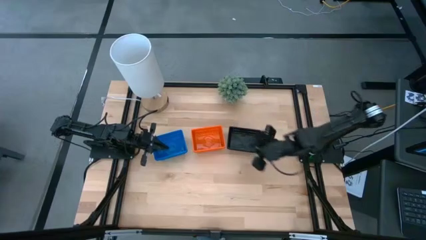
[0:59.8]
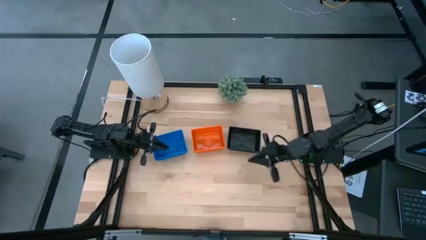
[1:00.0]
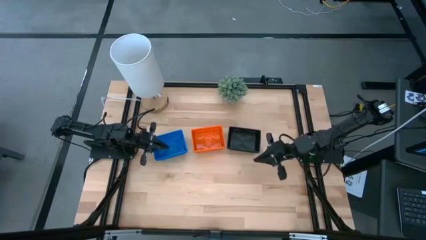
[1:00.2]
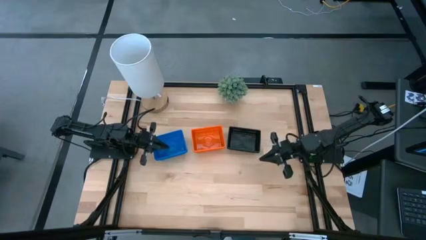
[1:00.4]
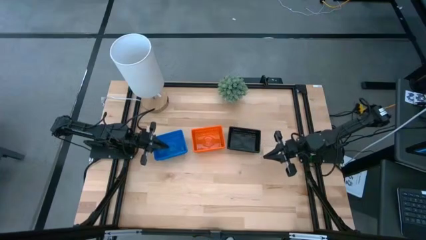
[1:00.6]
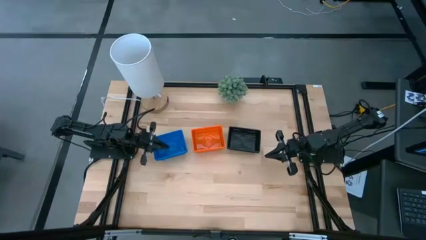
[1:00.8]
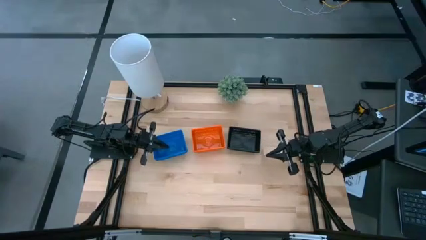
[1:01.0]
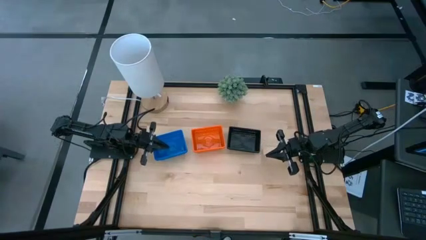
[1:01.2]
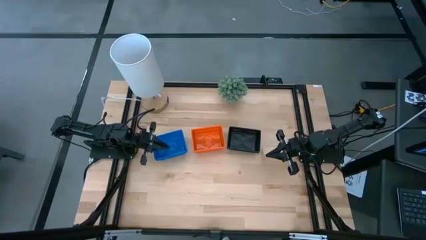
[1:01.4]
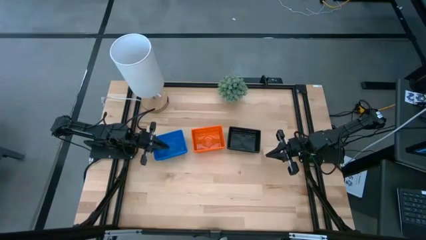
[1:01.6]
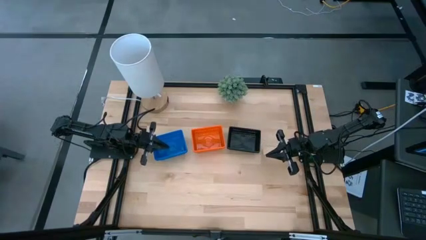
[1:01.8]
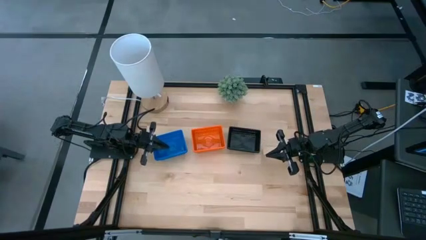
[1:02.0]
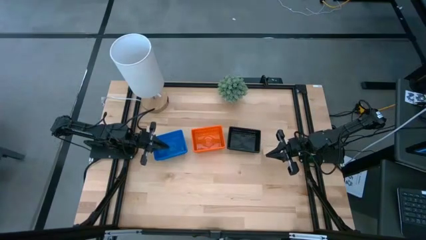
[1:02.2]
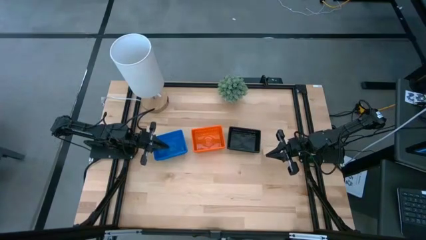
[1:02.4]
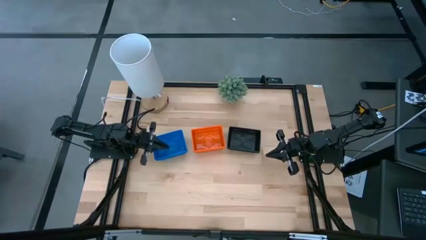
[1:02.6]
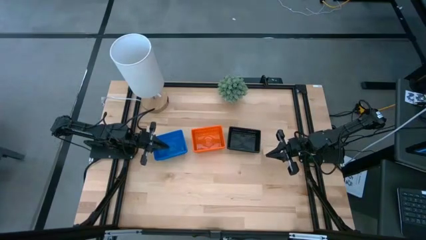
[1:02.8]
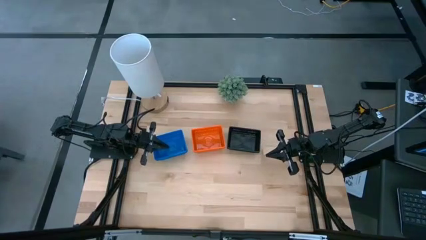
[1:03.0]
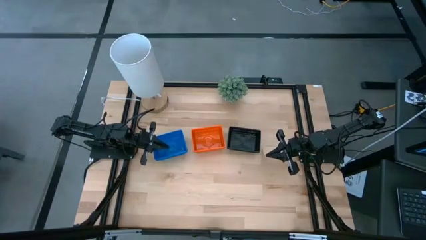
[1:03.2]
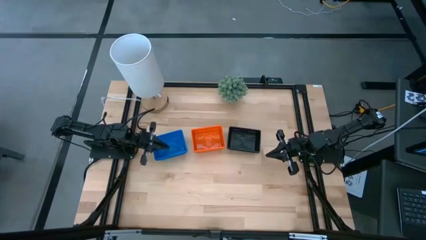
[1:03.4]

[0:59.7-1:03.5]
Return to Home Position

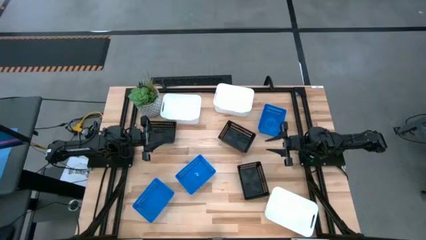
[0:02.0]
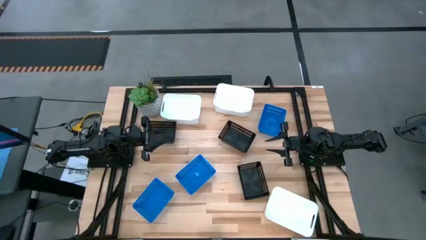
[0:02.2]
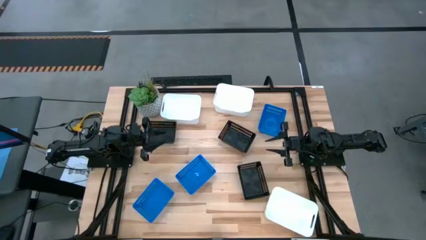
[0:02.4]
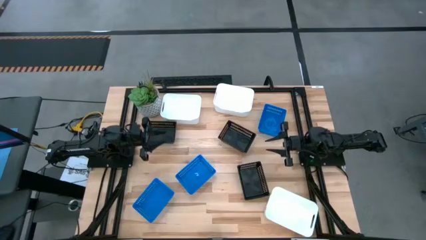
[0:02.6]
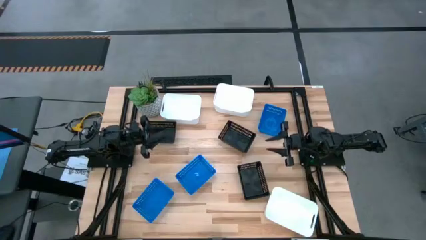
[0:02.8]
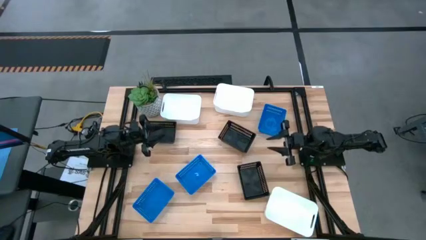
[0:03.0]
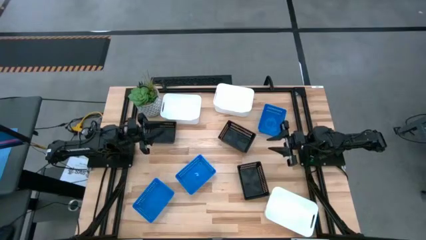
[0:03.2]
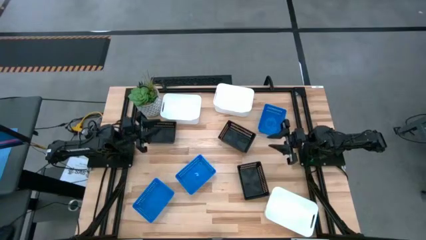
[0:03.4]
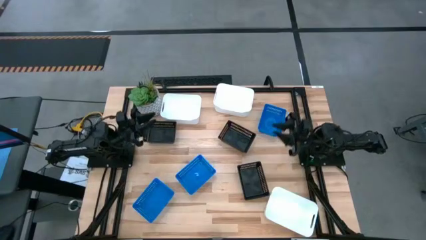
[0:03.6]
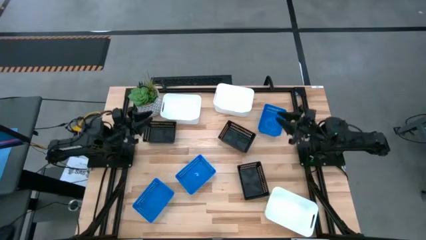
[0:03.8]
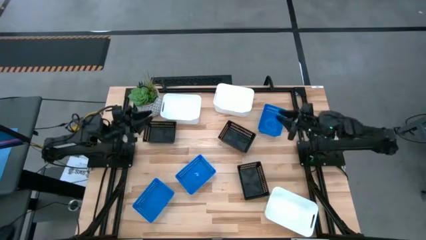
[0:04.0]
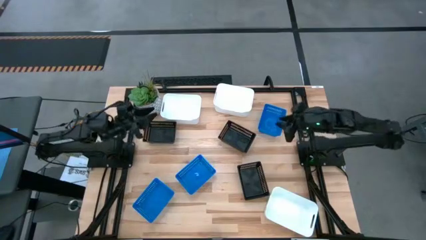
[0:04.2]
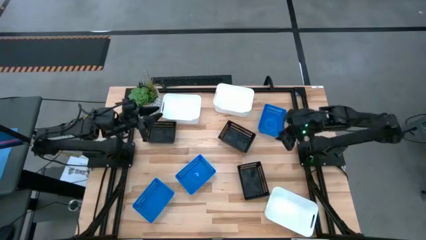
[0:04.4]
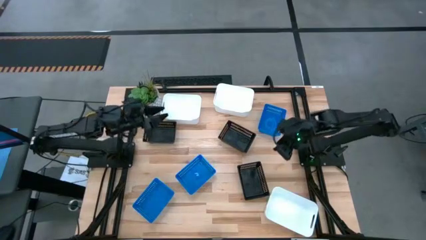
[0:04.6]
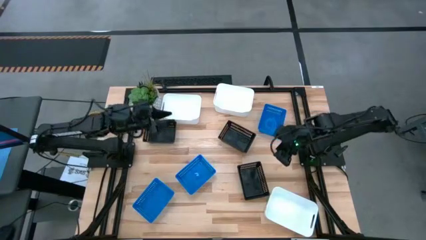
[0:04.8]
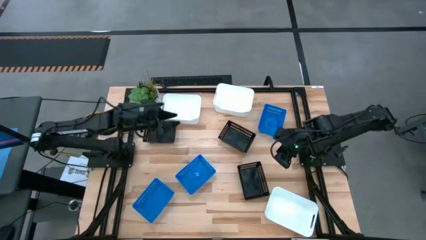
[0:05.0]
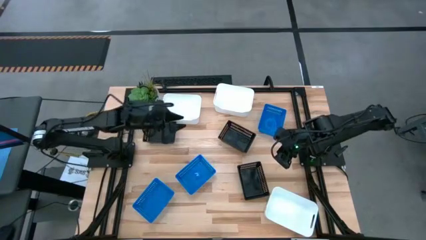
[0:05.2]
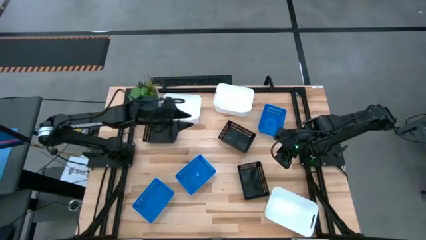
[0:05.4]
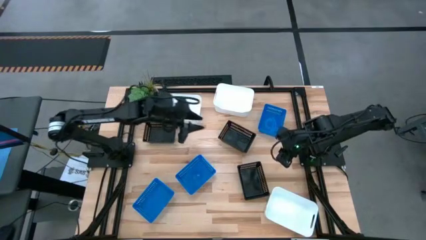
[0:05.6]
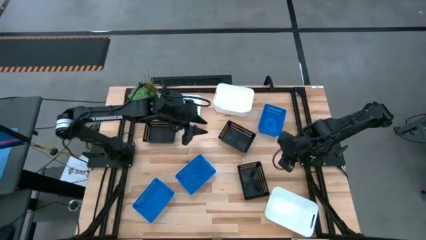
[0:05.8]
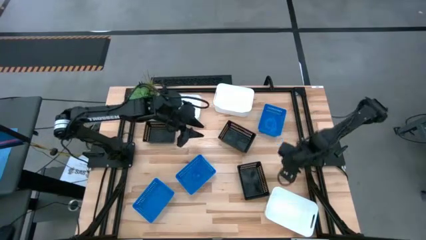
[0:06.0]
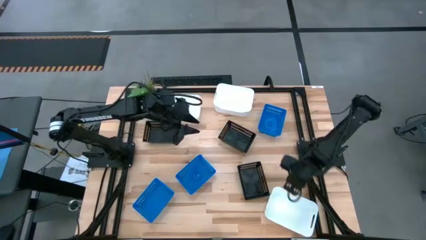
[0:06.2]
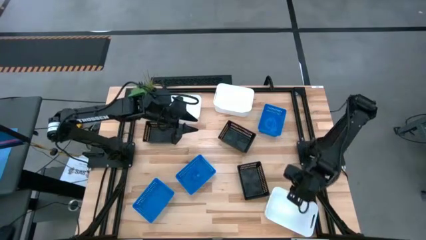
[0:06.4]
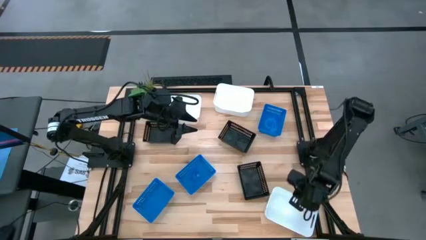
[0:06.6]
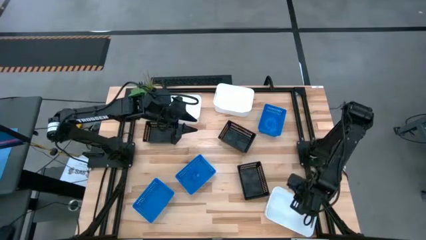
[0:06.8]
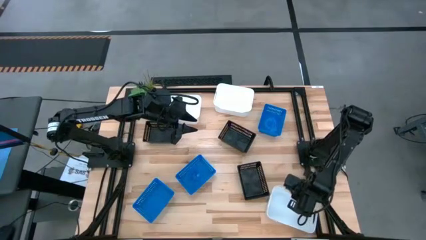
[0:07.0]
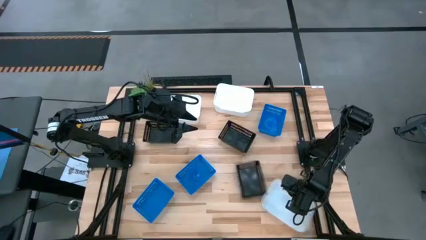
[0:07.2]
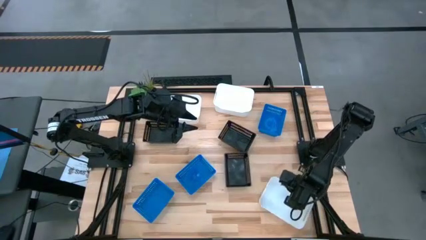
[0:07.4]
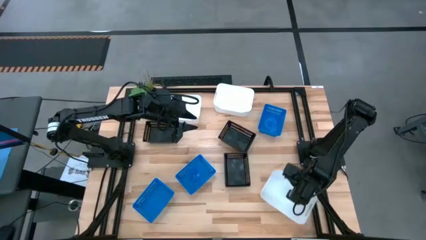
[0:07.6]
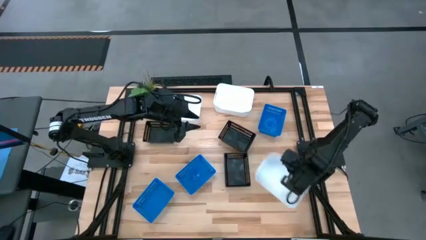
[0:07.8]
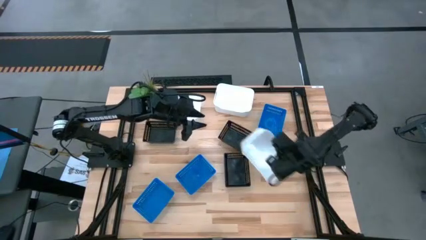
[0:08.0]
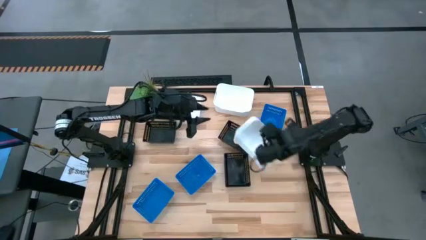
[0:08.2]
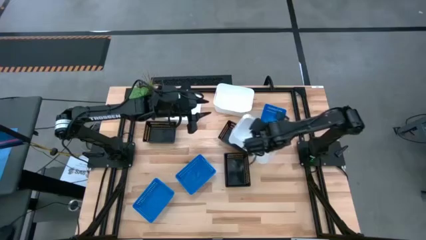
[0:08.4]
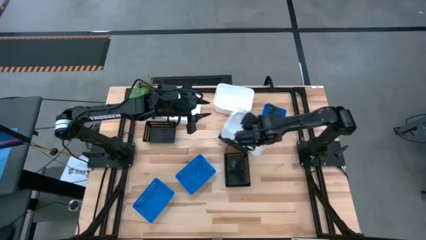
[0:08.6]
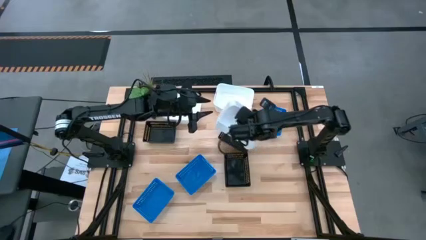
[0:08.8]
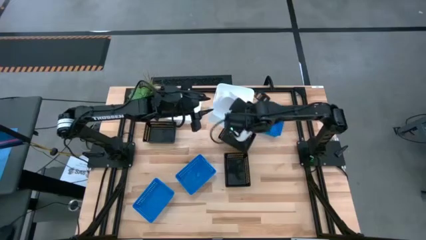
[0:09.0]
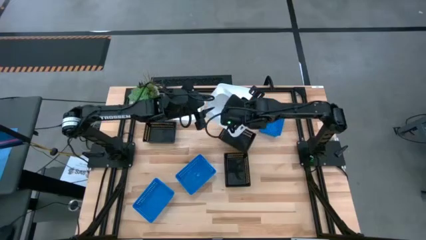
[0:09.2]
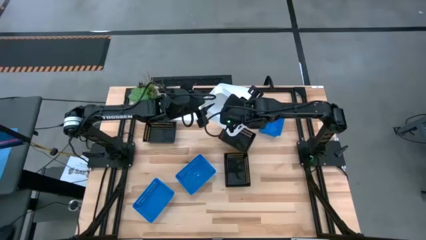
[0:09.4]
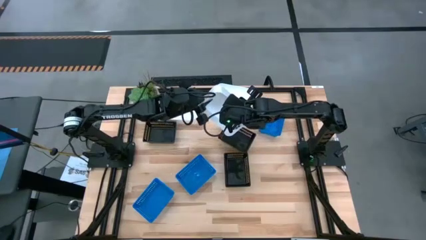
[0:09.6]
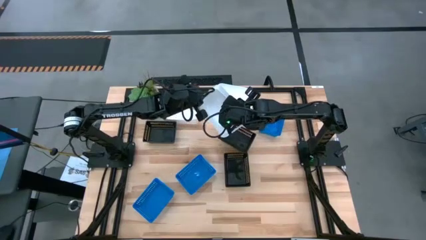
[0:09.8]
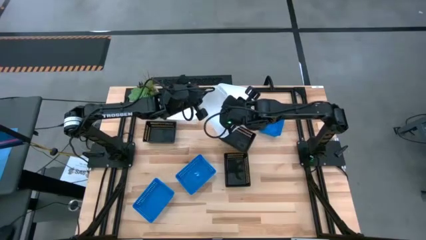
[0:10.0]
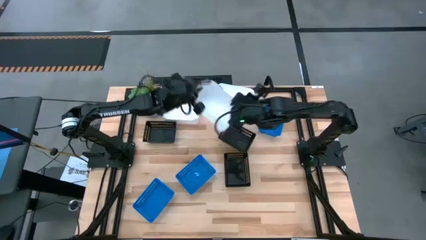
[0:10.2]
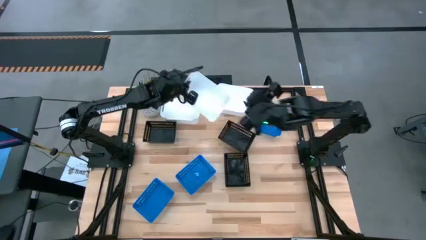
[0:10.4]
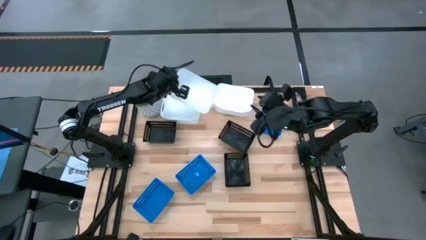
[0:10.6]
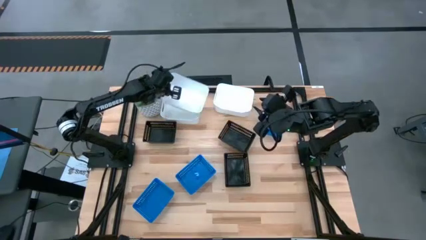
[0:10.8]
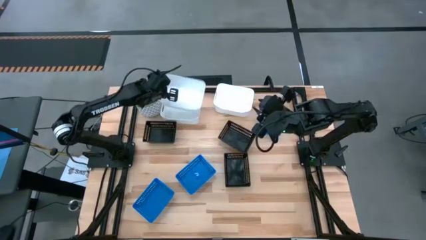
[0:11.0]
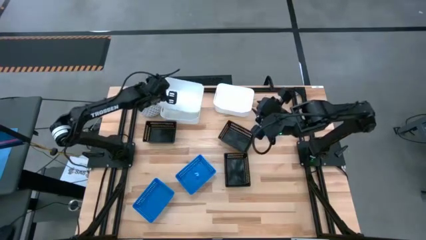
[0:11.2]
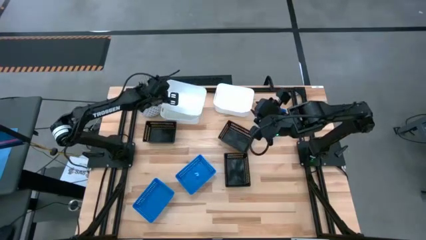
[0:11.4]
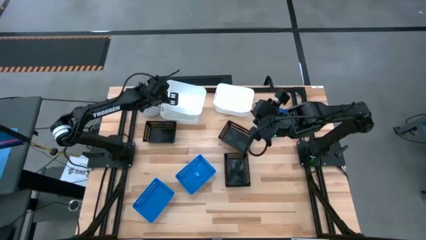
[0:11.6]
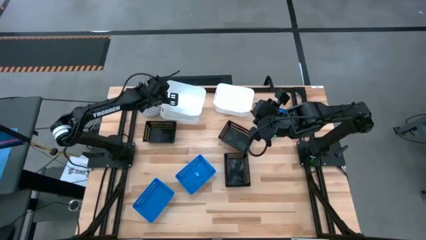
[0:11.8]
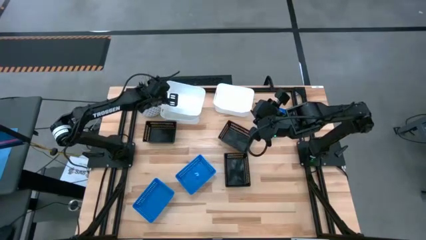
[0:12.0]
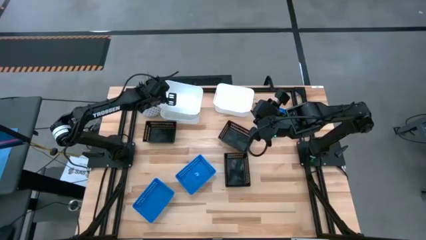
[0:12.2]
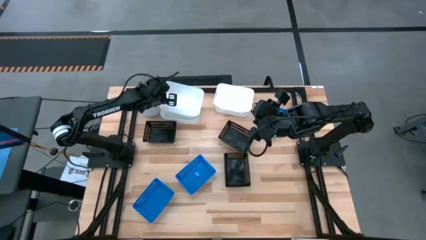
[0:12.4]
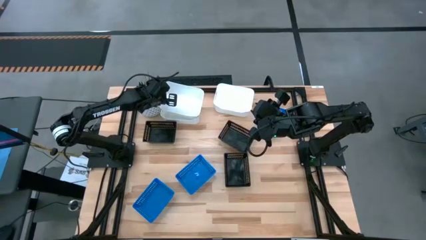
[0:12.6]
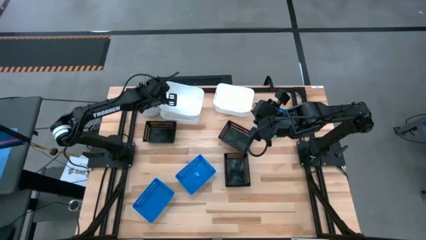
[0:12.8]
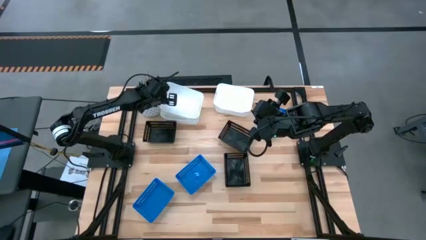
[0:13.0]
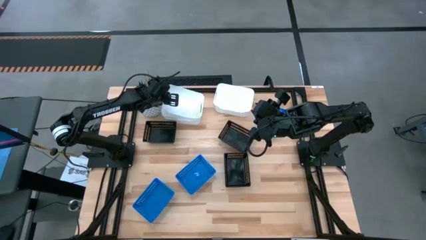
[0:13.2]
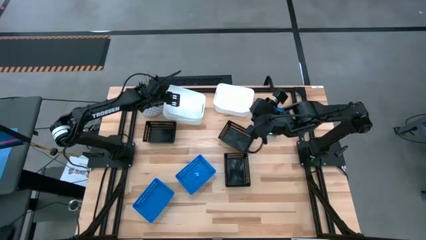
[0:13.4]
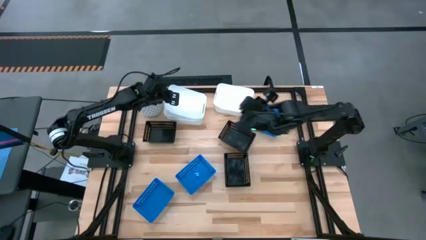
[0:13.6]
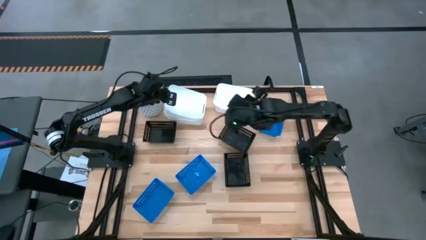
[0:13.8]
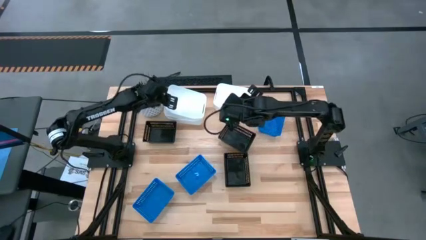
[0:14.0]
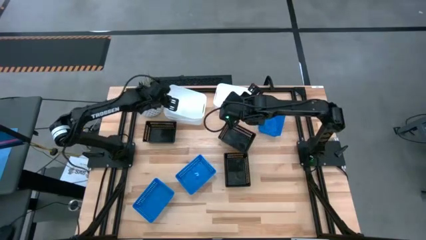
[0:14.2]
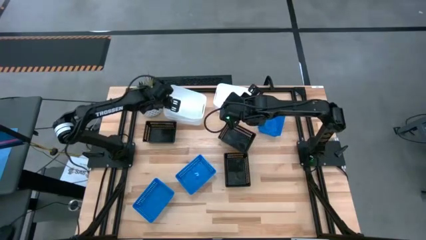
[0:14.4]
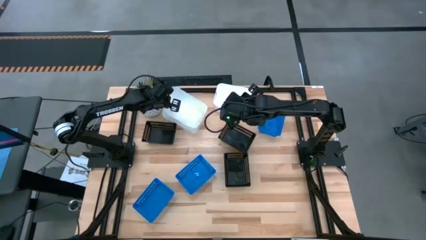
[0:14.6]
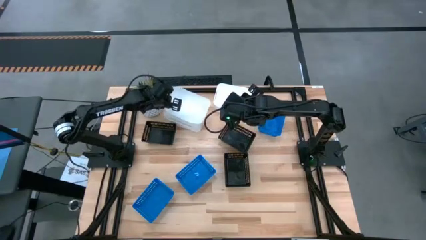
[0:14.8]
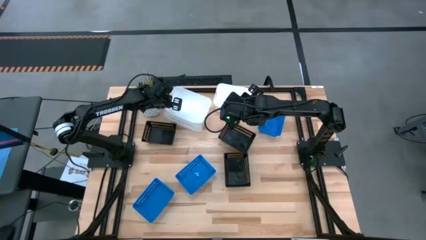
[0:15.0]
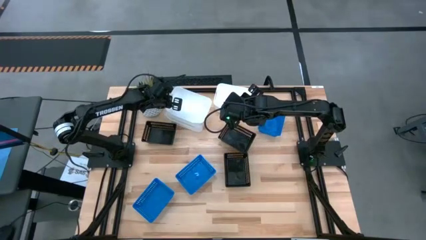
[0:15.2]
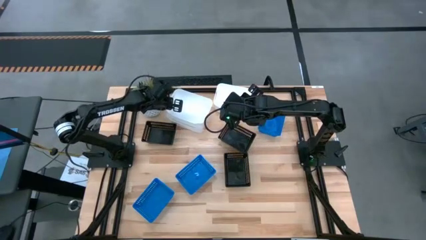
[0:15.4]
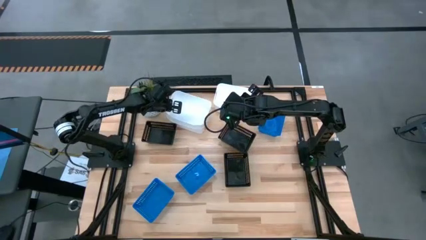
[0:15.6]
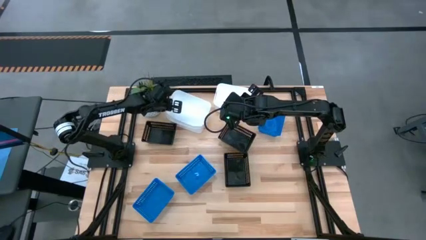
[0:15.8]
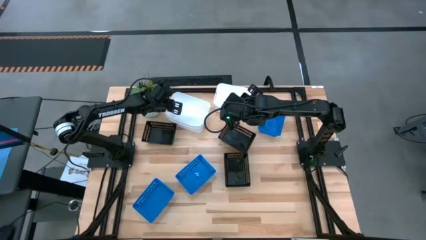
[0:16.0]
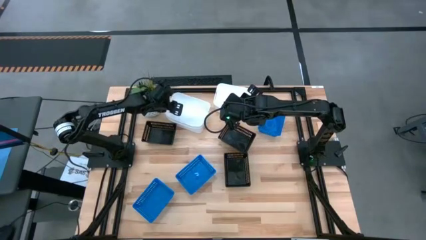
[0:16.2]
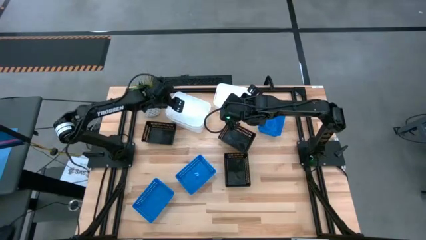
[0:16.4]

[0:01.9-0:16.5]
Stack the bottom right white bin on top of the top left white bin
